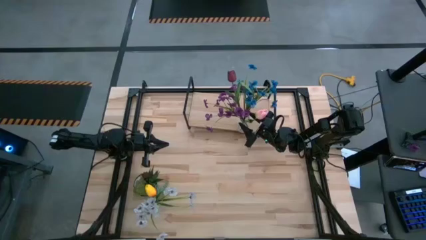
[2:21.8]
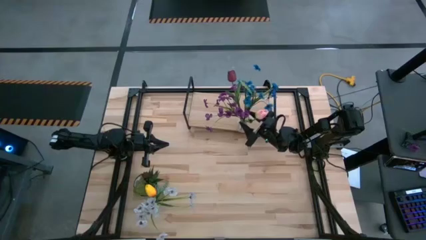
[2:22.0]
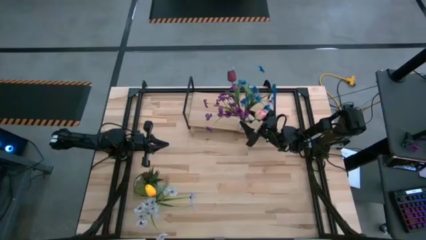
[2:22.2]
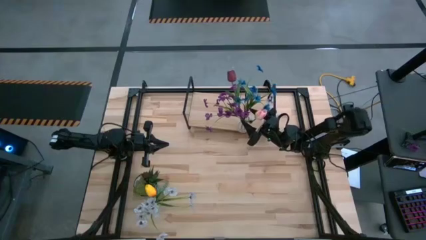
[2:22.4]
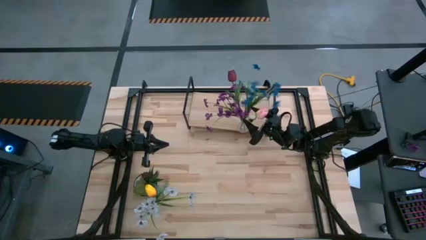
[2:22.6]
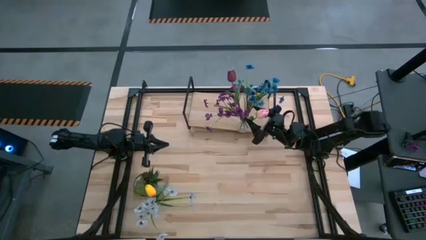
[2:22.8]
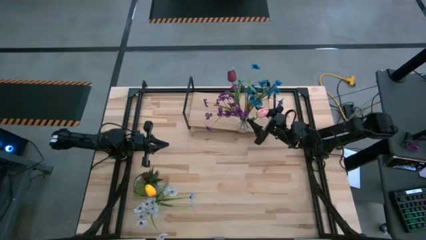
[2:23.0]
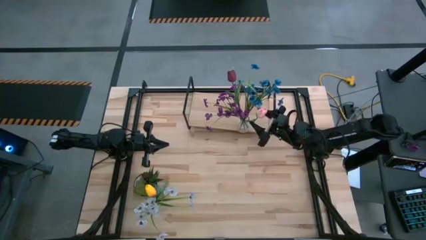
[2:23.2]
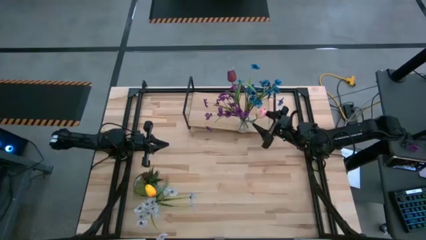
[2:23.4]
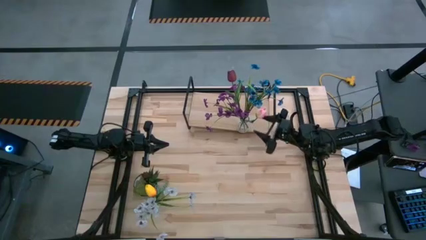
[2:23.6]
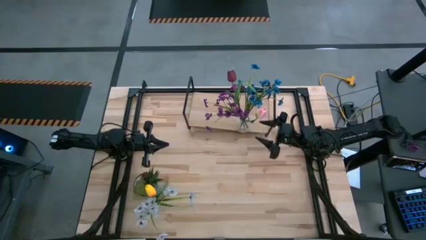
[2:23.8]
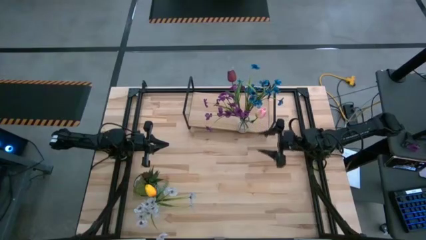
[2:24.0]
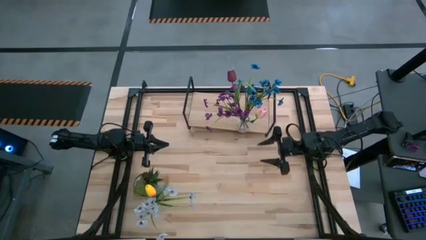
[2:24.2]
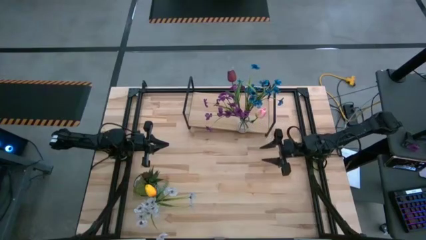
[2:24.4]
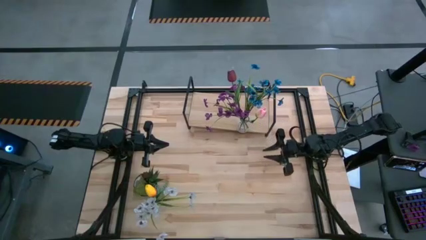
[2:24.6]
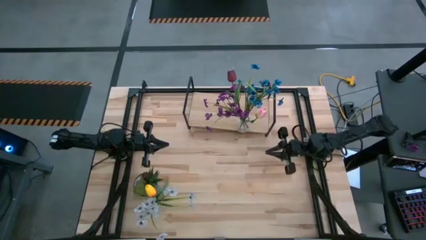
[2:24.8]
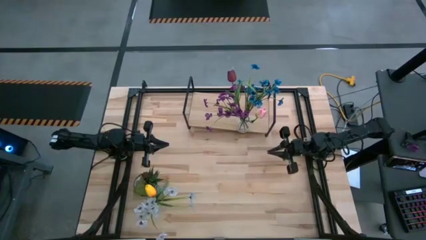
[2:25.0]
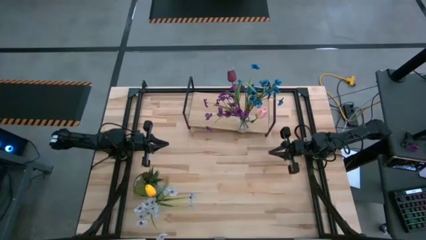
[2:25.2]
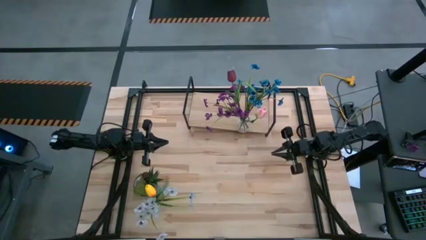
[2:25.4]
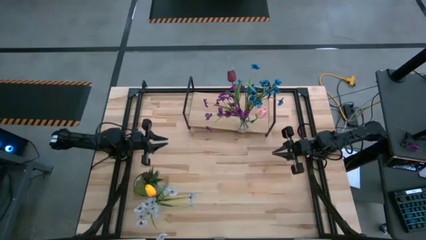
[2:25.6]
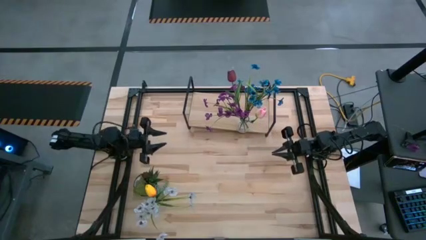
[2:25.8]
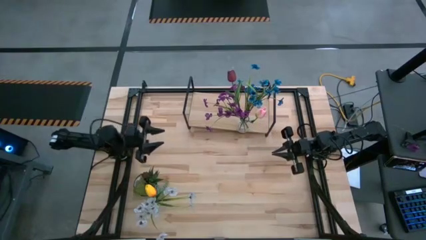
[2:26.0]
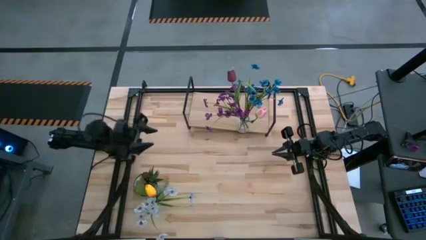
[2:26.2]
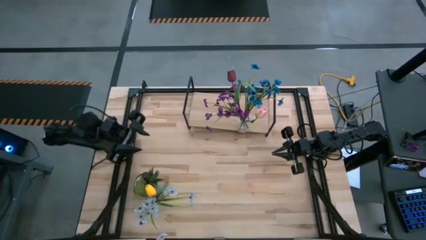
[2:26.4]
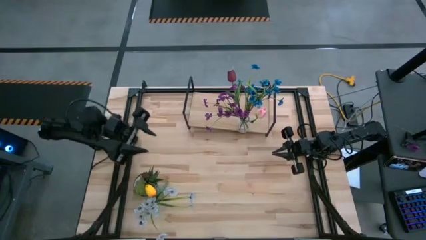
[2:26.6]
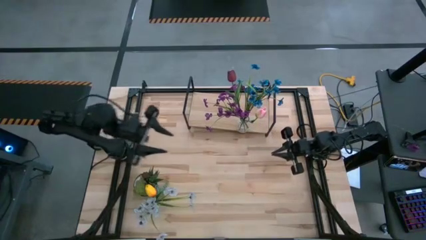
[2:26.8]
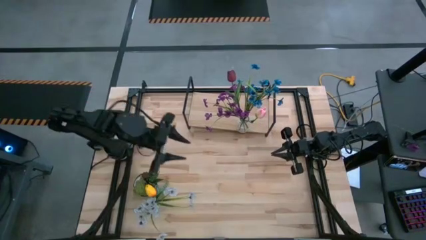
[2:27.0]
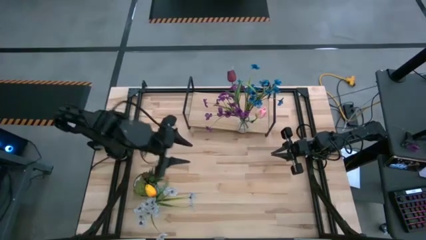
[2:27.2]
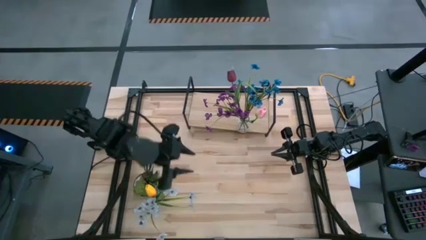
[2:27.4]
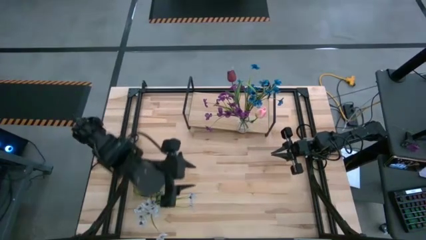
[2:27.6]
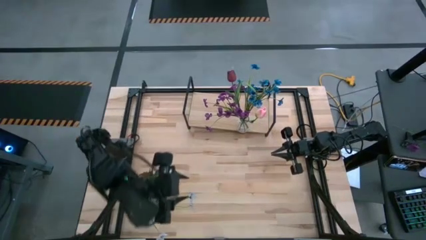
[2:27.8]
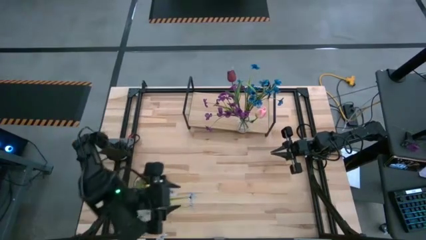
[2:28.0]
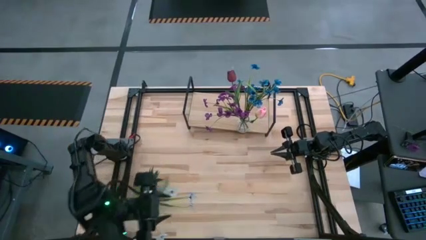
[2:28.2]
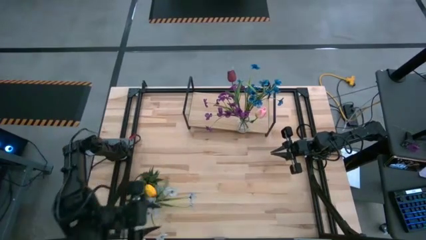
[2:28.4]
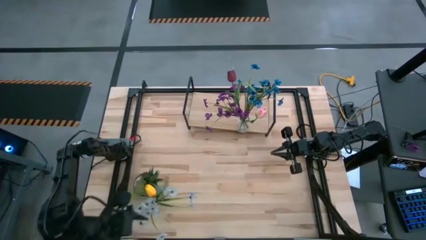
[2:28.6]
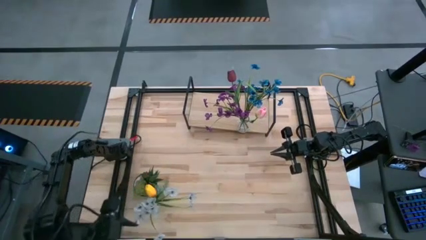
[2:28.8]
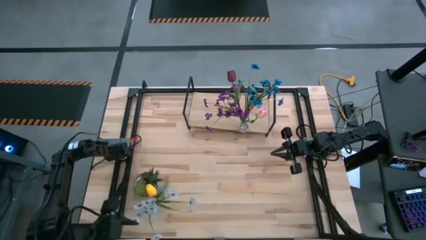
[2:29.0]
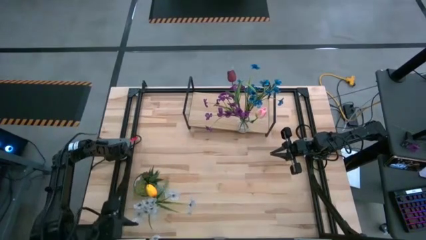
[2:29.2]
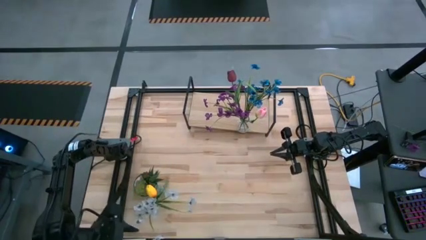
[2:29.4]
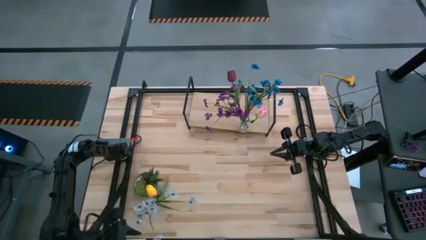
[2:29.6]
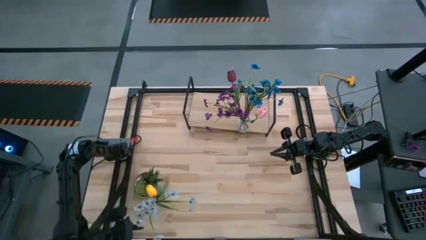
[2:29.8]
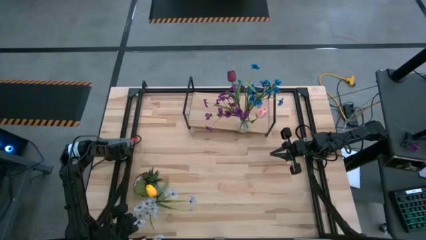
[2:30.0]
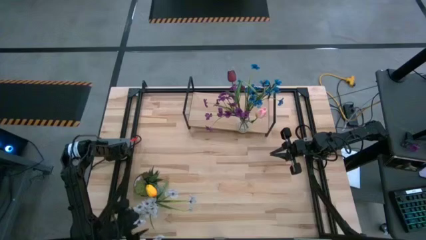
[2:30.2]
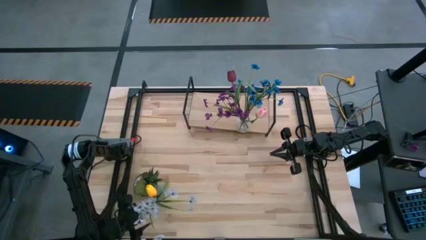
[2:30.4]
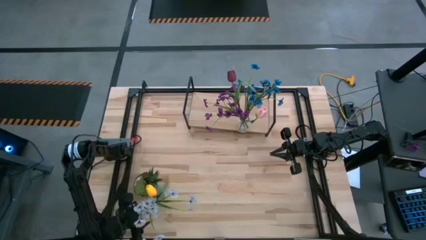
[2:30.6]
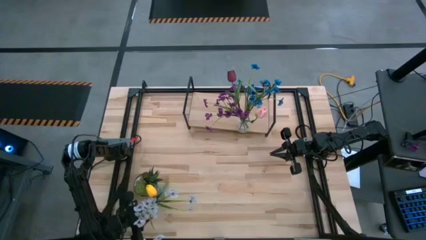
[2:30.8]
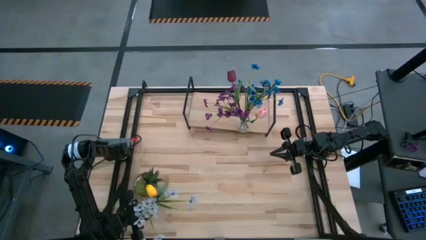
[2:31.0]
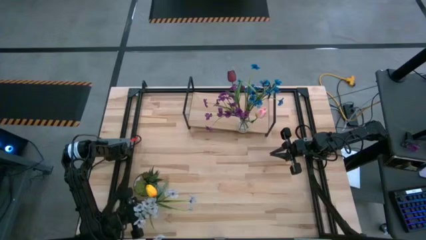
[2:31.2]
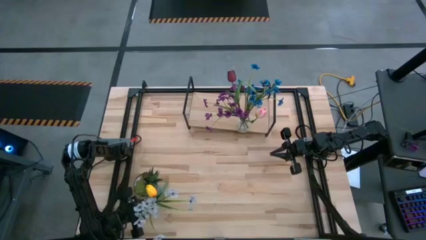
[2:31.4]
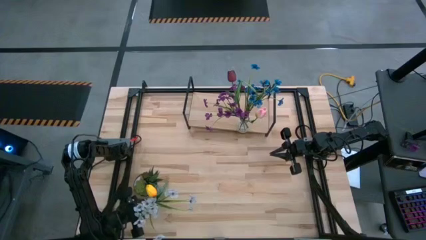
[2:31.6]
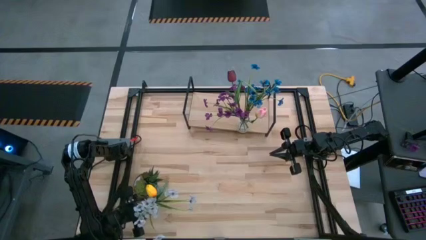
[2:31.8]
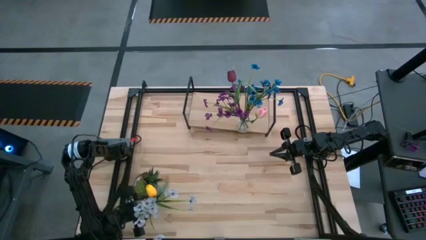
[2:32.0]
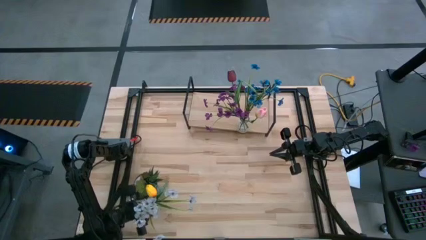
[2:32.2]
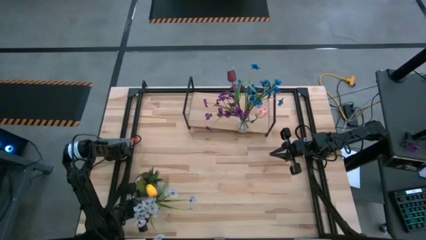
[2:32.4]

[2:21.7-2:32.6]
Task: Pick and place flowers into a vace then onto a shelf
Put the transparent vase on the shelf
